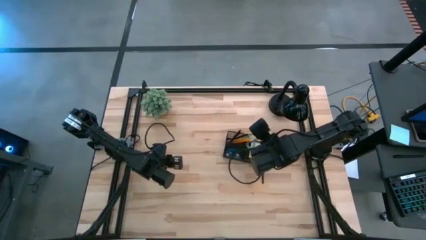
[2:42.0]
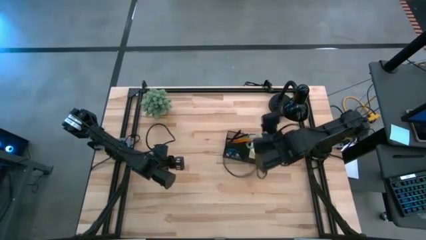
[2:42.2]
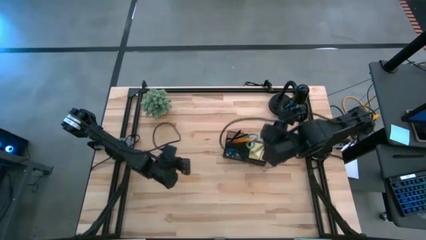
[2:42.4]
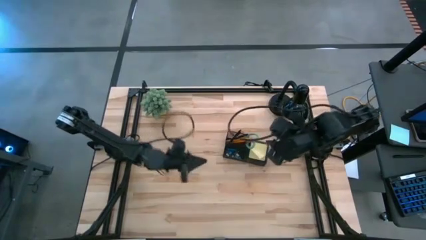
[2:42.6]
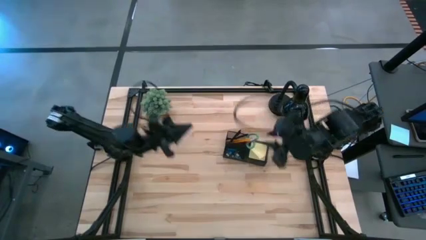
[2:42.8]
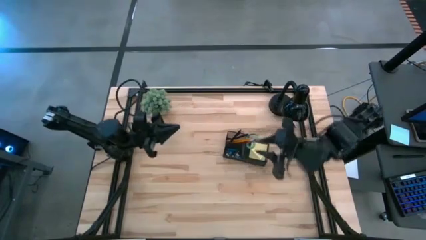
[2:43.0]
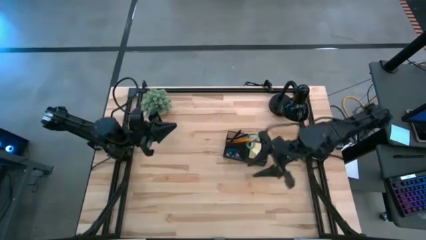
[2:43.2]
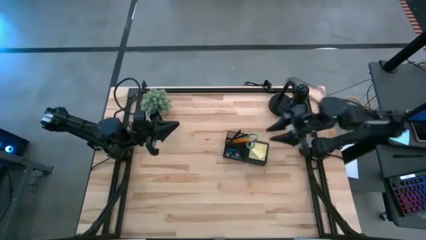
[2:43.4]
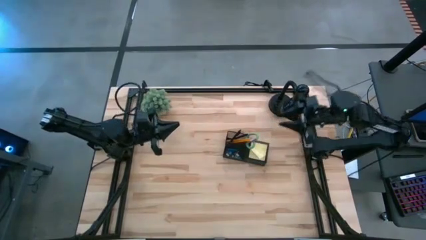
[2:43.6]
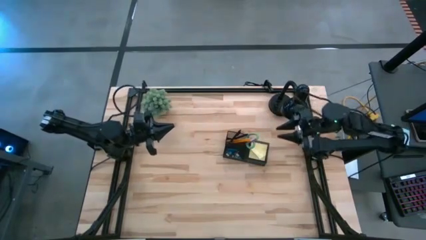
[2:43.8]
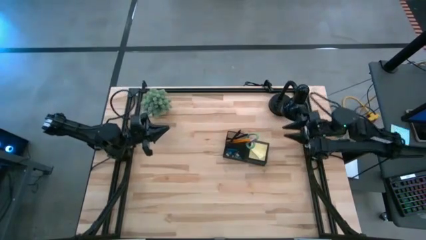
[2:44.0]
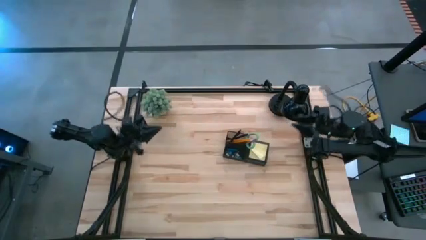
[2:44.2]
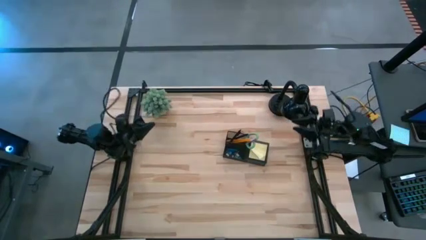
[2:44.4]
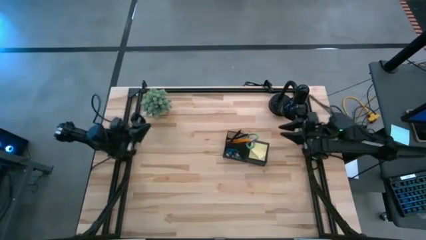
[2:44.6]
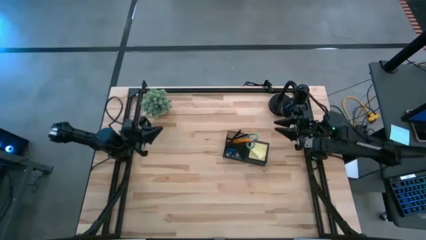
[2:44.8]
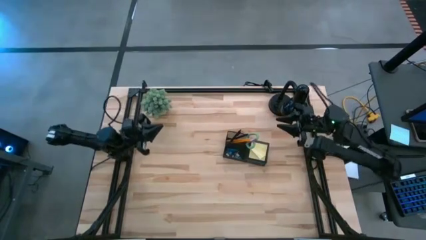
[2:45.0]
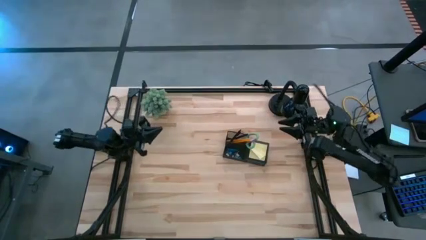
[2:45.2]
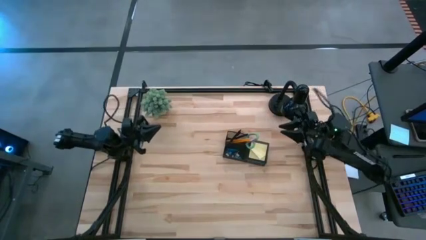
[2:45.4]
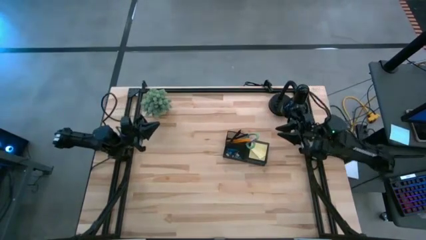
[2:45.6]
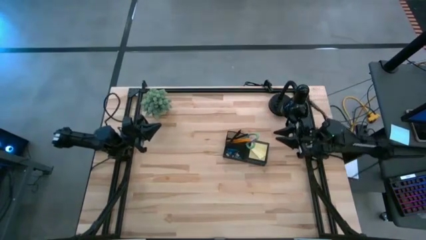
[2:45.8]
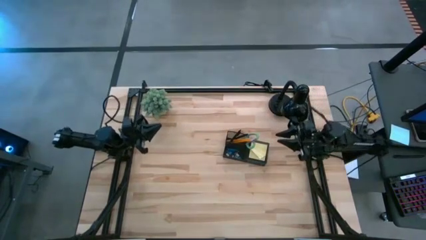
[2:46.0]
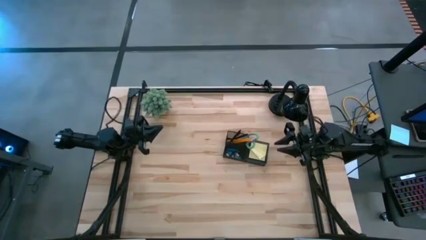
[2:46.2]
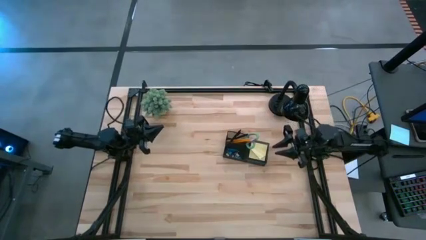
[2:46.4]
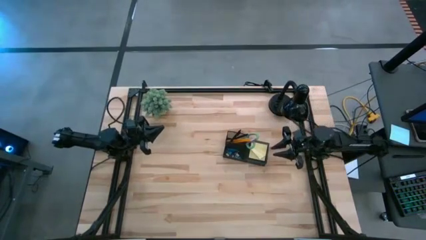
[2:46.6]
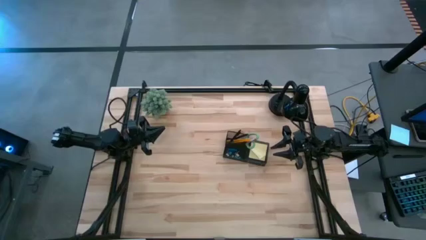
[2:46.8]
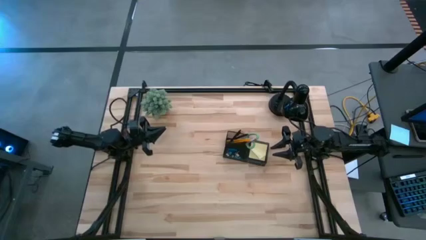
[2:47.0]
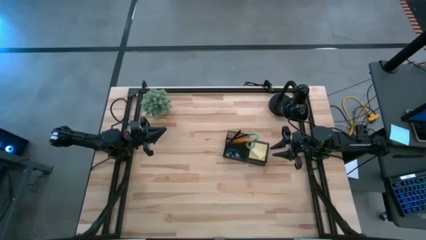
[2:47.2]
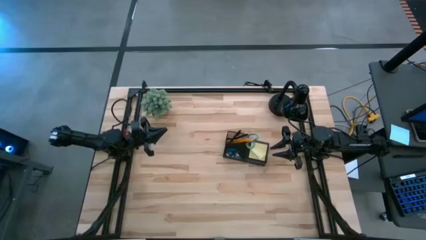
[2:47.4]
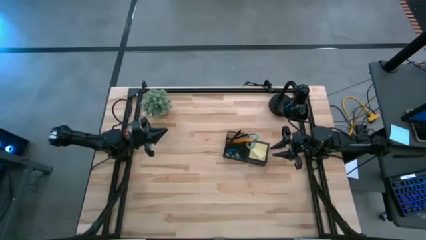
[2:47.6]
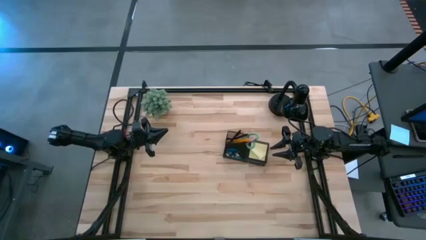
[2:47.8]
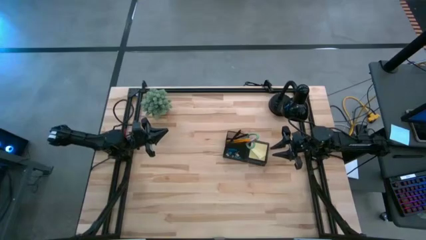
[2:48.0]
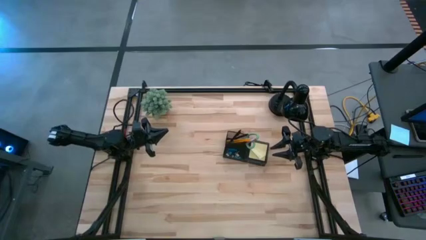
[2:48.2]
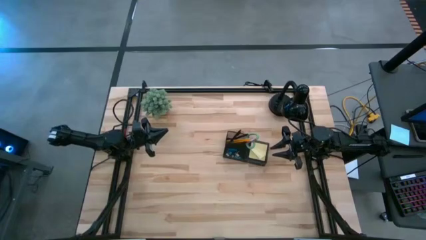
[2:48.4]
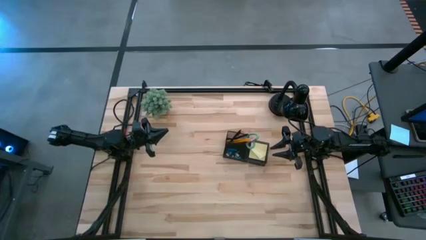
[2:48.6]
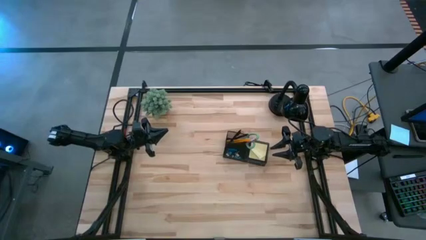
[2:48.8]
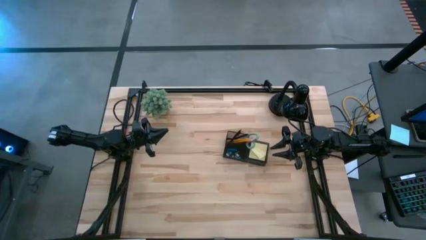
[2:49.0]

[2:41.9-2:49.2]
Task: Pick and place office supplies into organizer
Return to Home Position

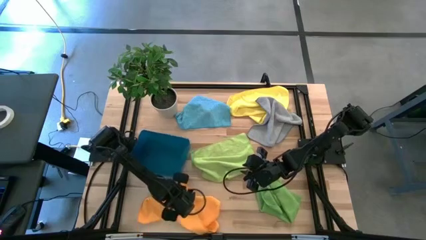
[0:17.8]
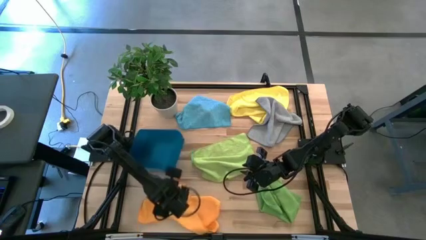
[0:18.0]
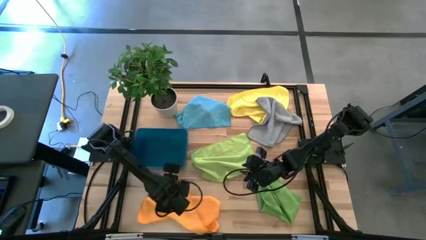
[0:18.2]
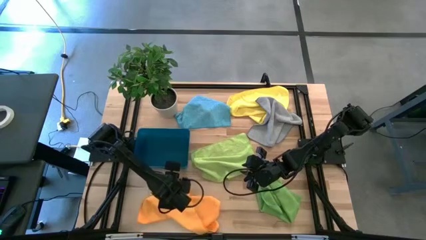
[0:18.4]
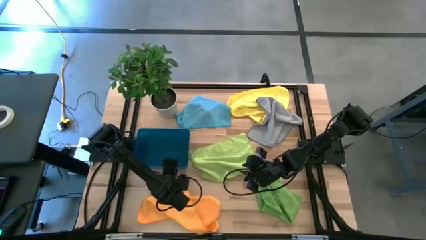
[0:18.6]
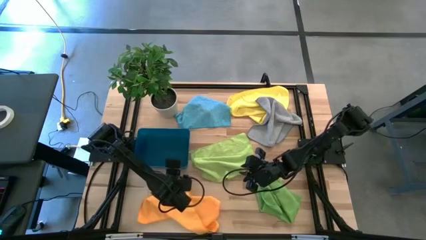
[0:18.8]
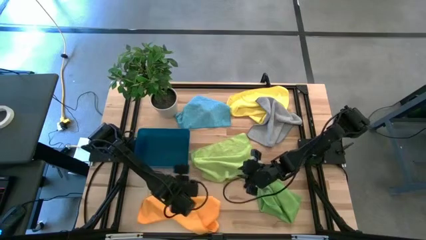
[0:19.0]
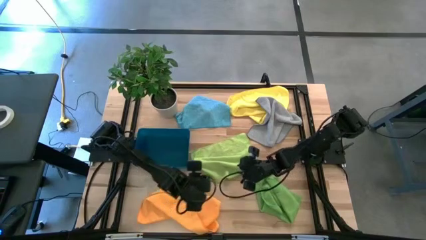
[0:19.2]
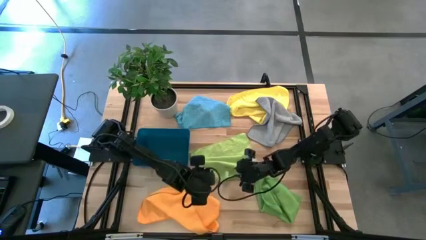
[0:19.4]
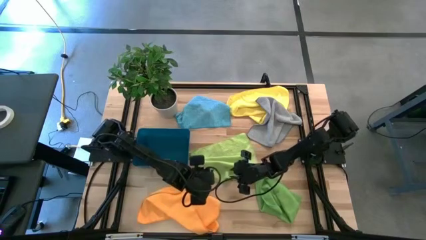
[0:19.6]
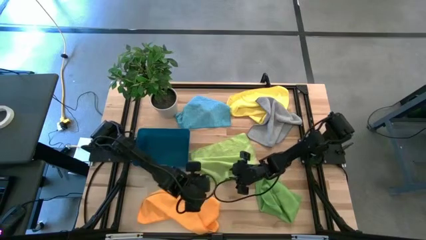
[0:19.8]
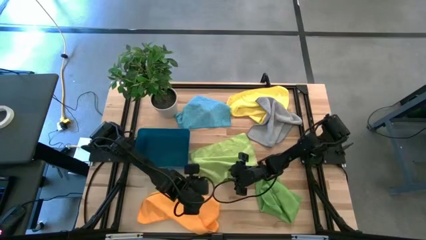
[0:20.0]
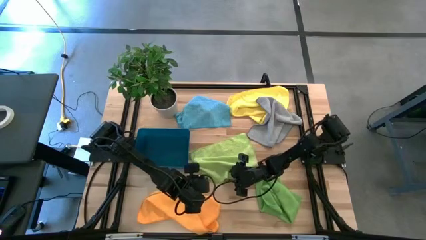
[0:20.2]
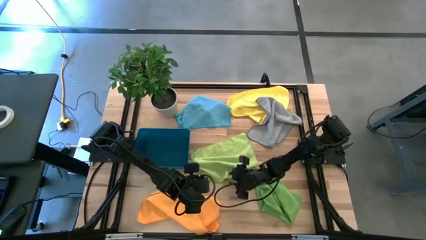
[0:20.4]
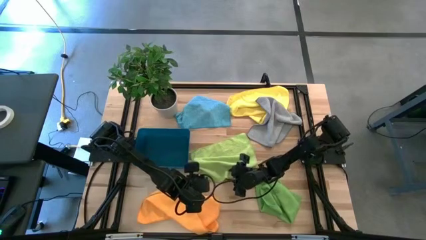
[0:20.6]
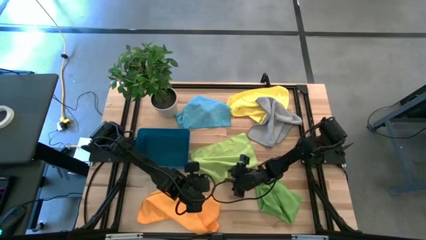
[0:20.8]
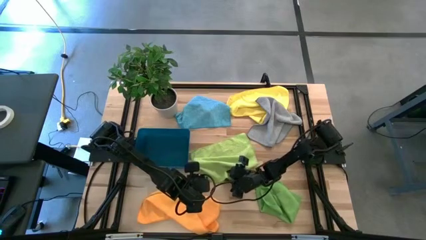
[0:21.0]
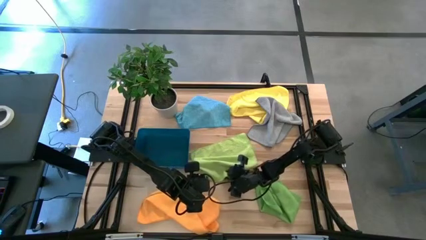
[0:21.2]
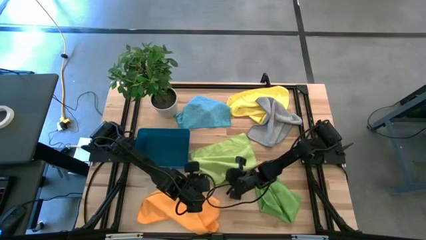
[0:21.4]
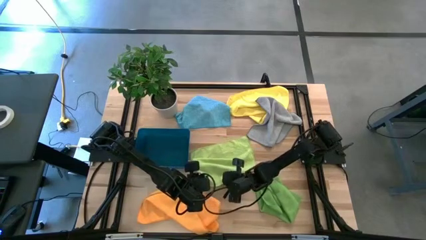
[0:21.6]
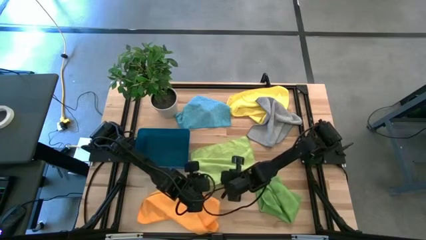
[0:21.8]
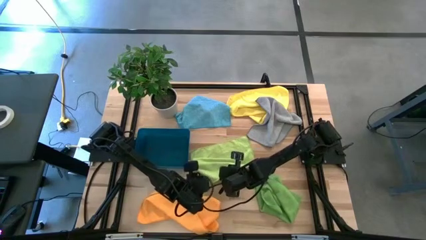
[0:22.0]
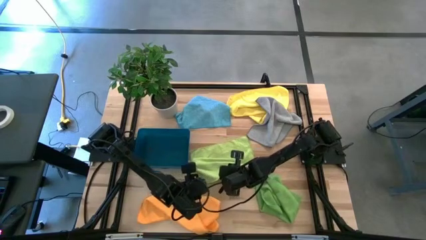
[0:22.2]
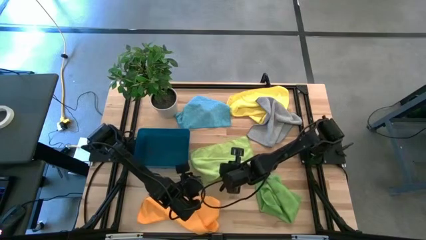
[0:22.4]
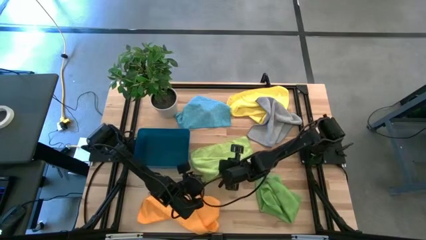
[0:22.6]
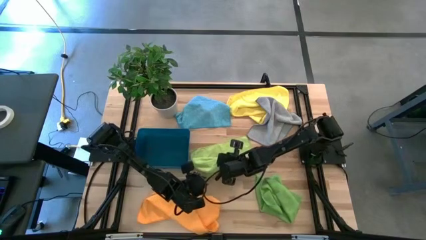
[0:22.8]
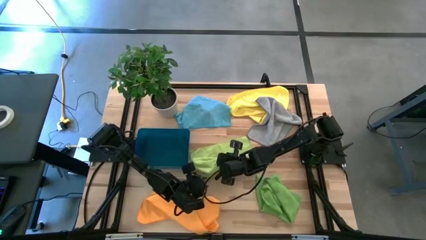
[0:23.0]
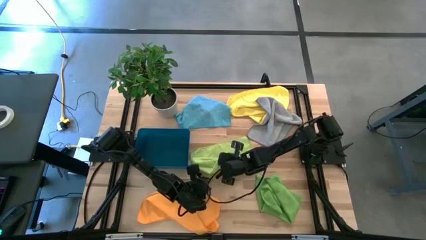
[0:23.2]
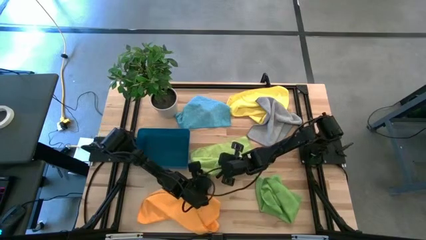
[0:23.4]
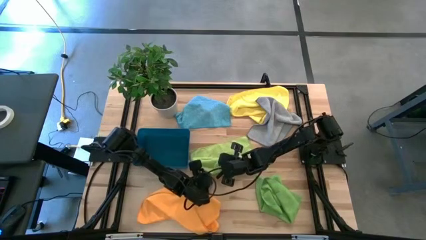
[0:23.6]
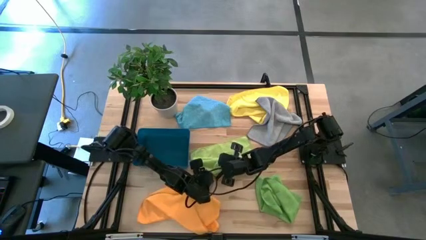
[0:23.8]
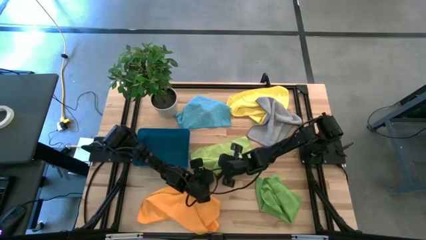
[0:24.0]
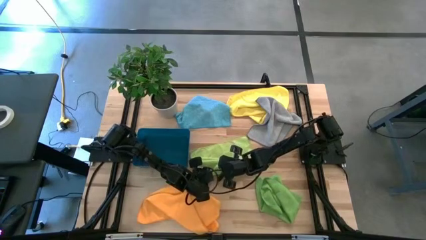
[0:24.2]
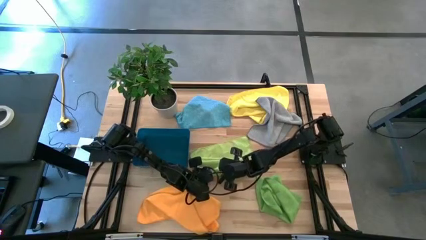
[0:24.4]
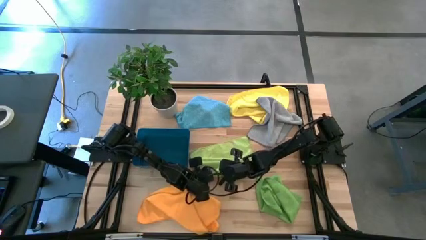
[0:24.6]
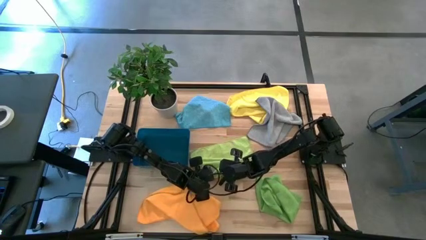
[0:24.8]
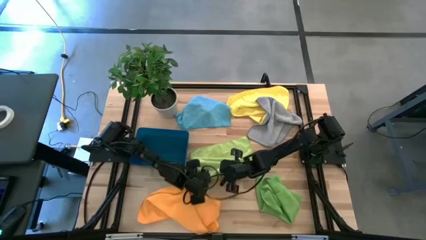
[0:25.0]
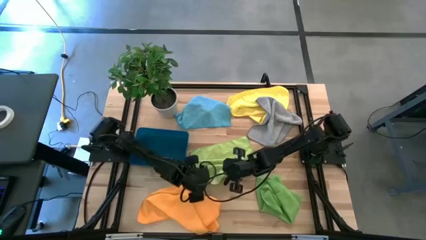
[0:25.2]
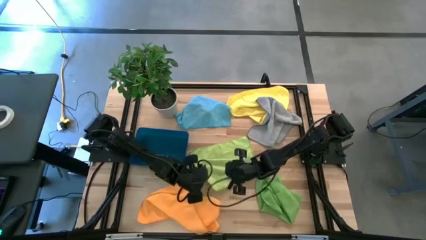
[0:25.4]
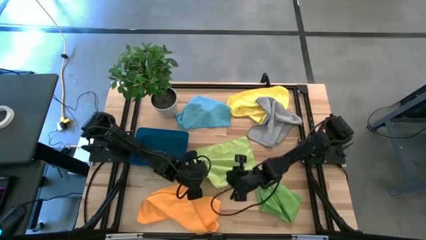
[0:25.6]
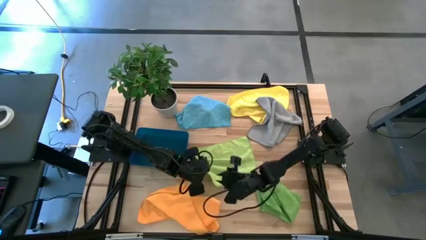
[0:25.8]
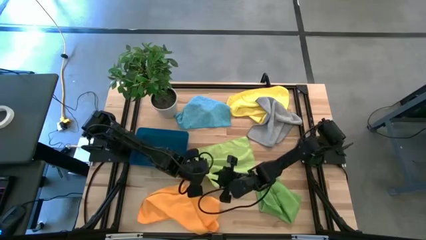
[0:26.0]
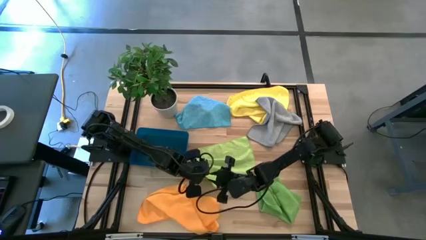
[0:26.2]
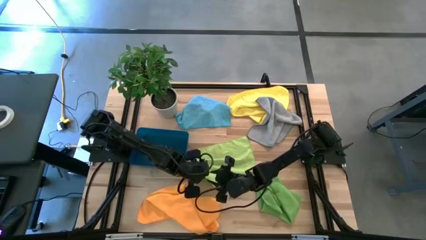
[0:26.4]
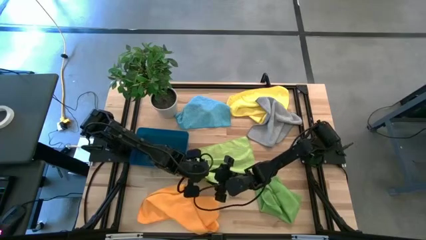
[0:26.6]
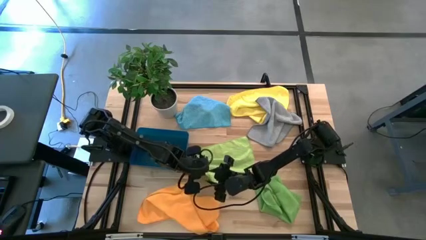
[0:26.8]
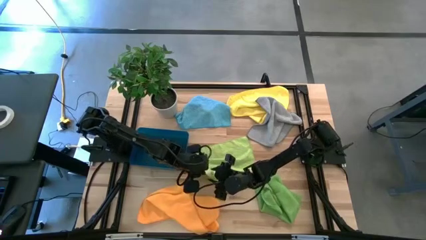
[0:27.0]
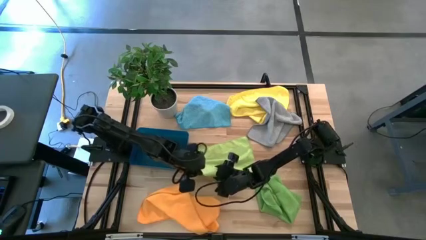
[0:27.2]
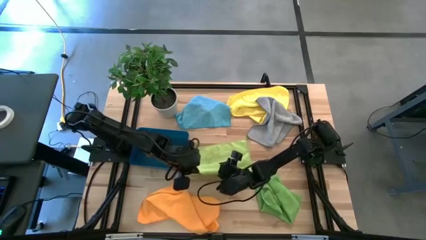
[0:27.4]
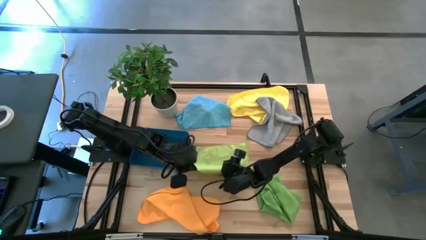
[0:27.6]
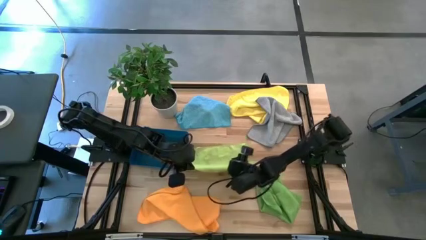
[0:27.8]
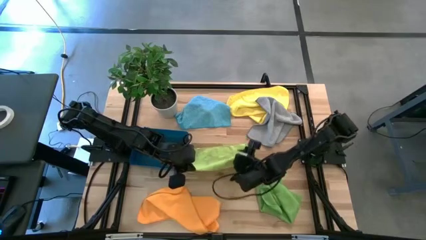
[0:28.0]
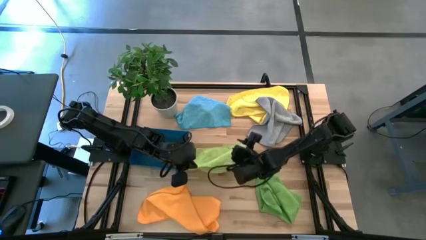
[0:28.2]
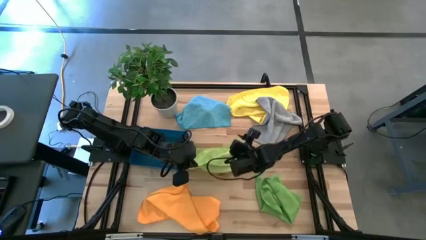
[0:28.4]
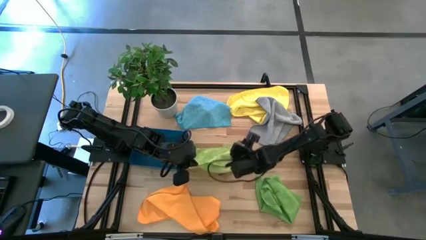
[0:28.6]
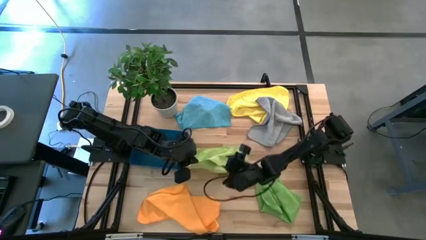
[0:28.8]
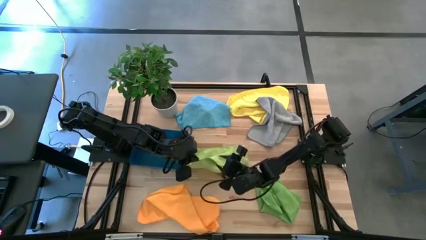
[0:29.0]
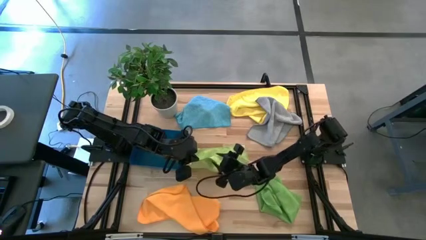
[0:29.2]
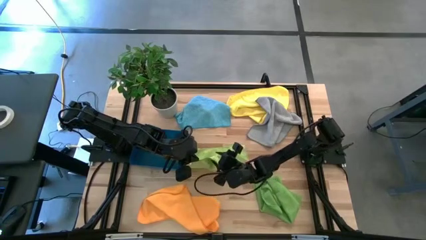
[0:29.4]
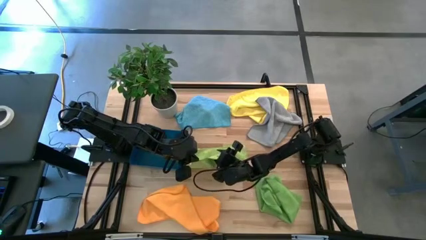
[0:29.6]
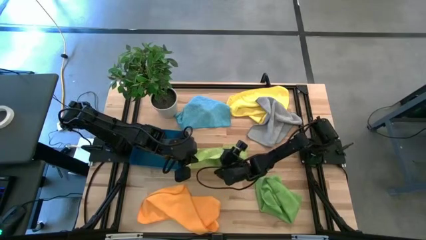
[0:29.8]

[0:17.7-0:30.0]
Task: Fold microfiber towels
Fold the light green microfiber towel on the table
